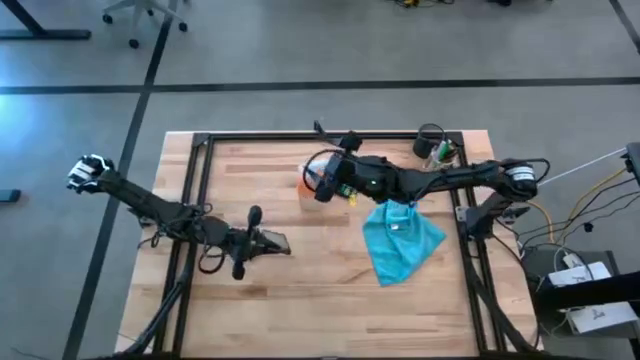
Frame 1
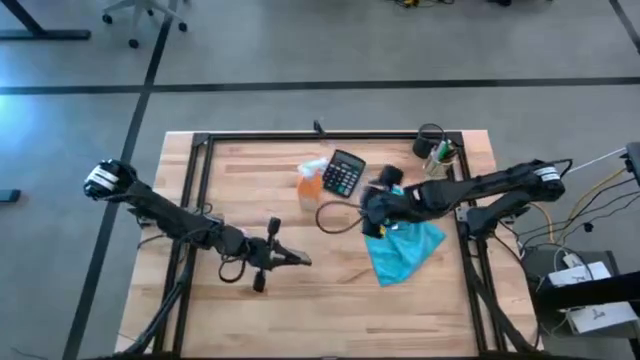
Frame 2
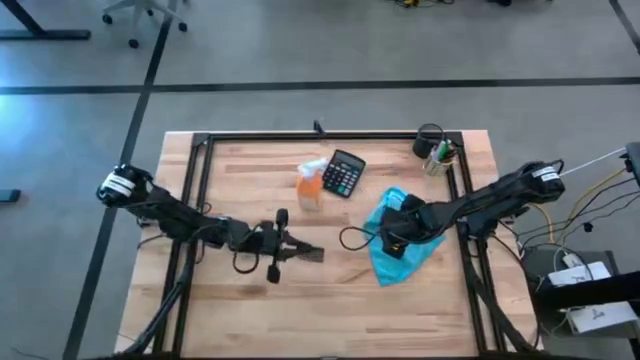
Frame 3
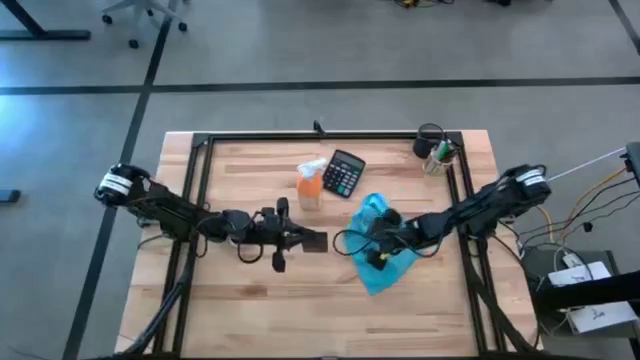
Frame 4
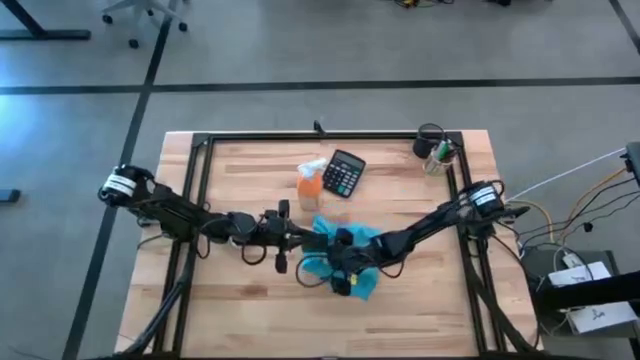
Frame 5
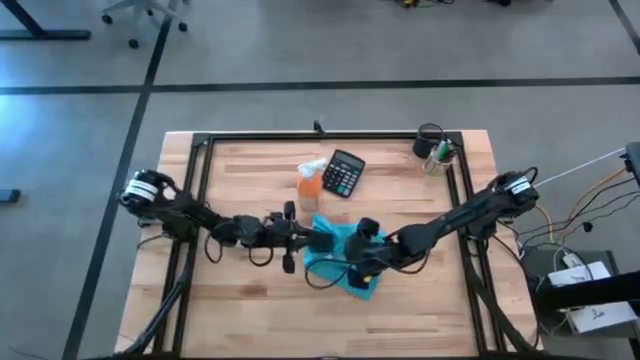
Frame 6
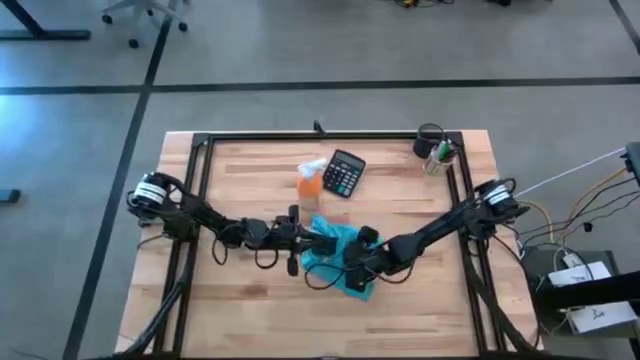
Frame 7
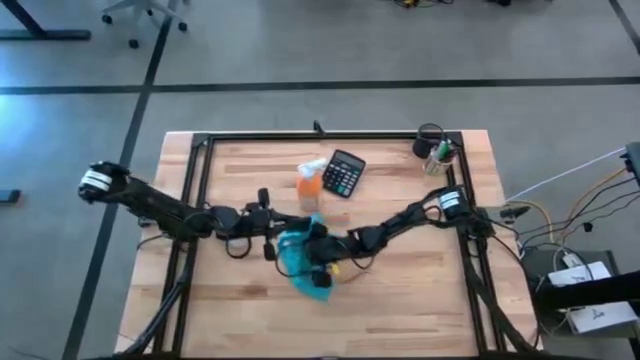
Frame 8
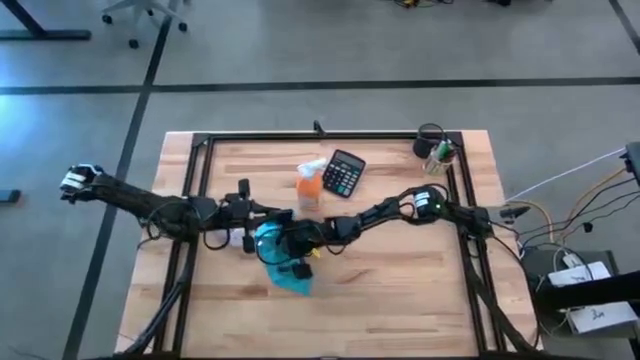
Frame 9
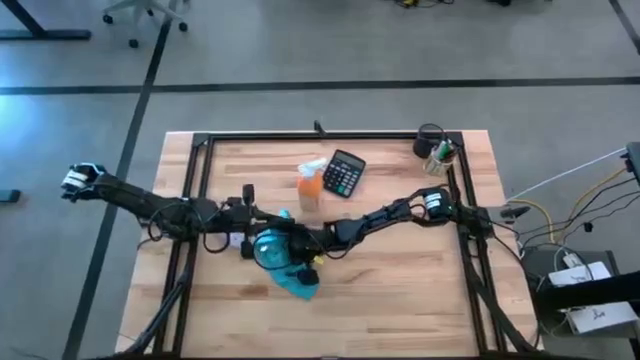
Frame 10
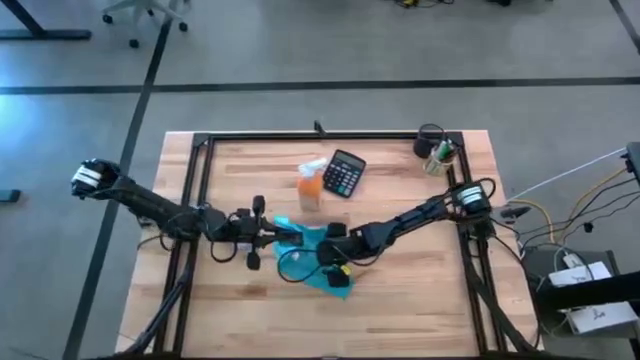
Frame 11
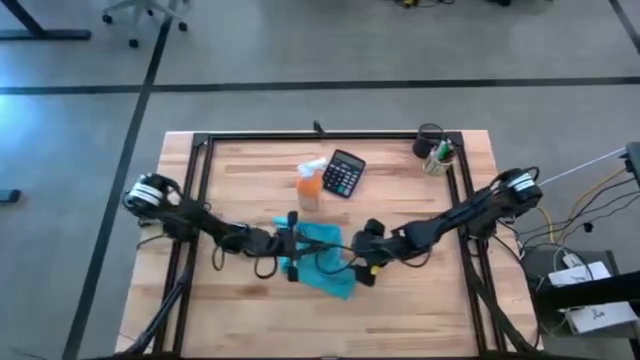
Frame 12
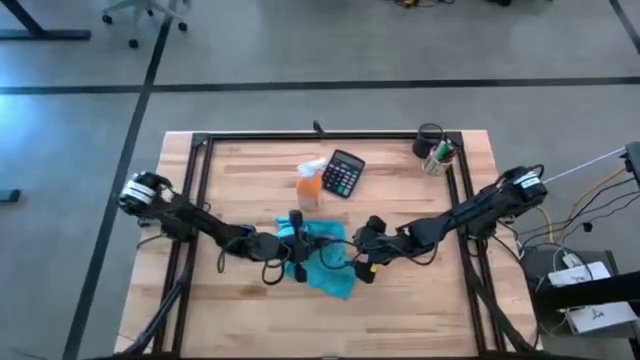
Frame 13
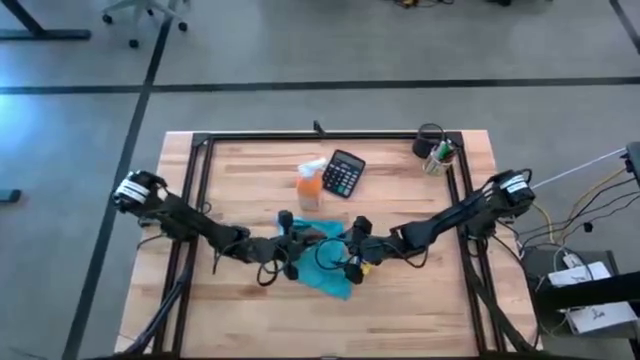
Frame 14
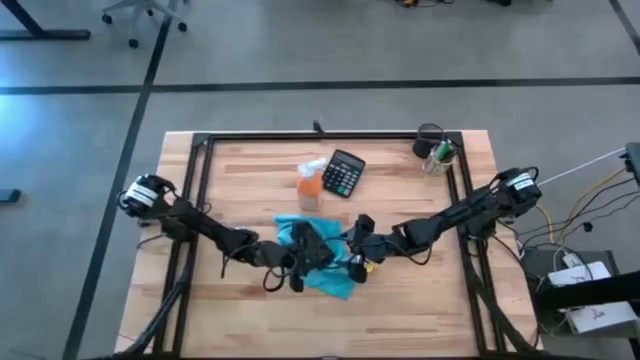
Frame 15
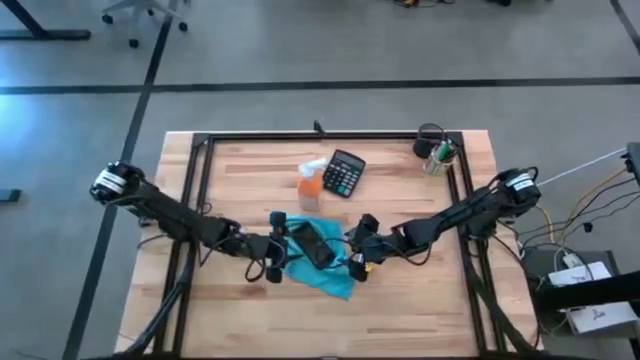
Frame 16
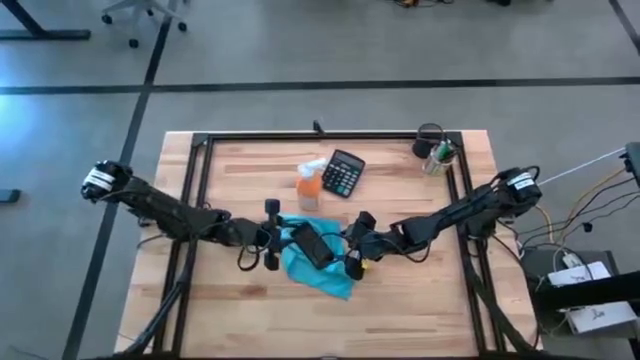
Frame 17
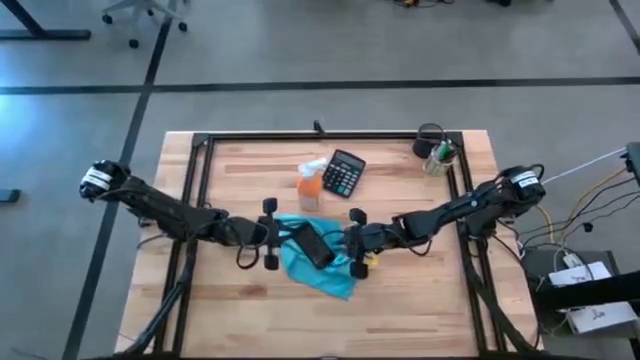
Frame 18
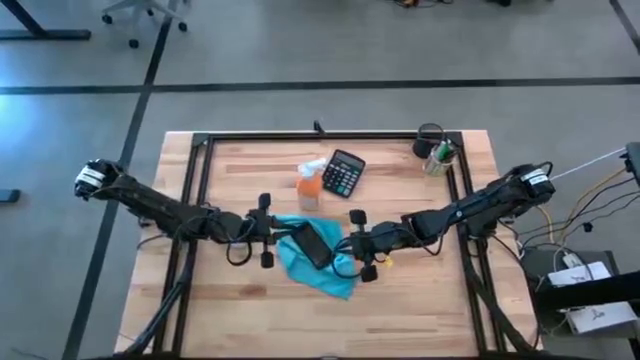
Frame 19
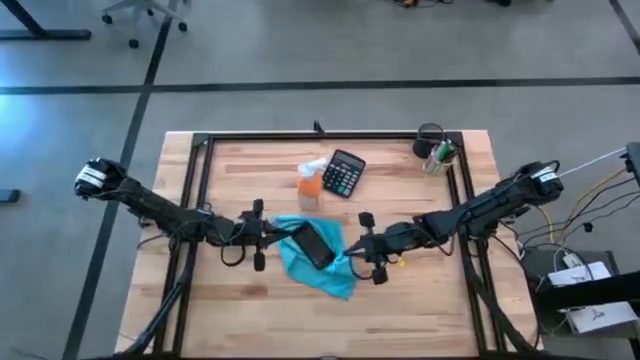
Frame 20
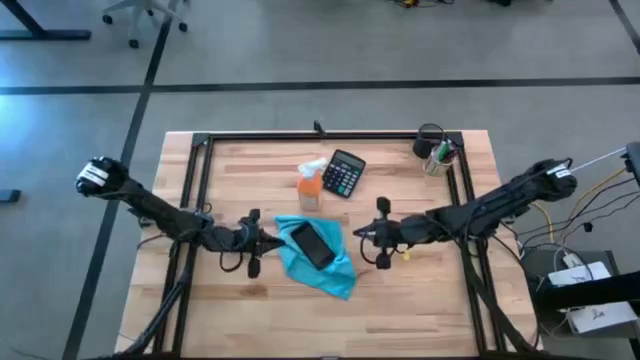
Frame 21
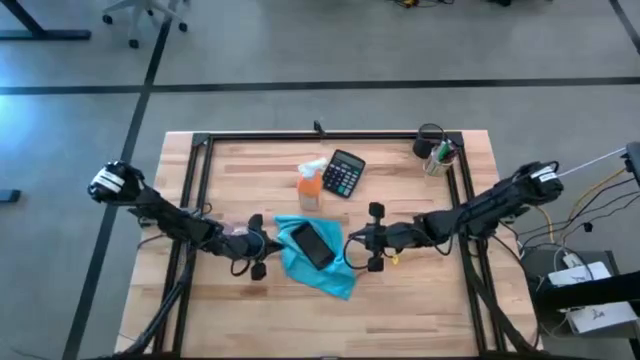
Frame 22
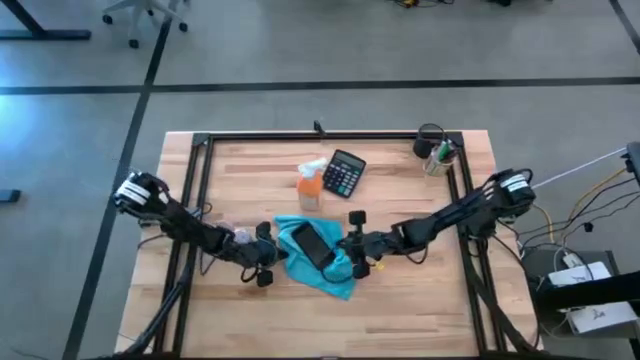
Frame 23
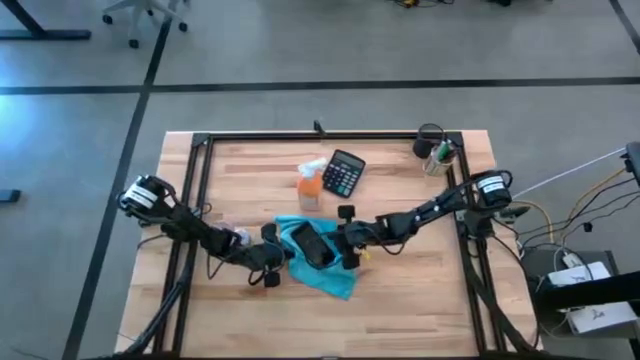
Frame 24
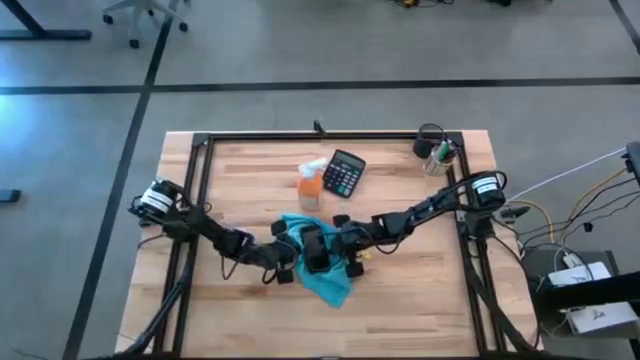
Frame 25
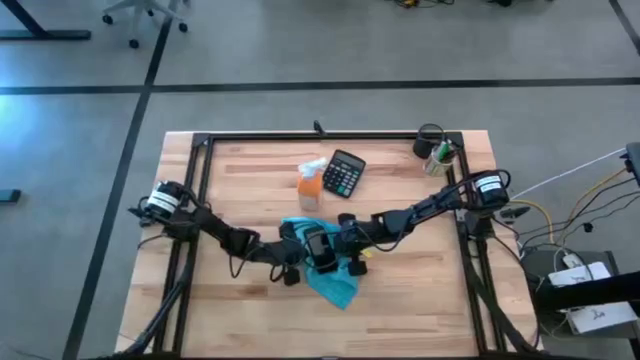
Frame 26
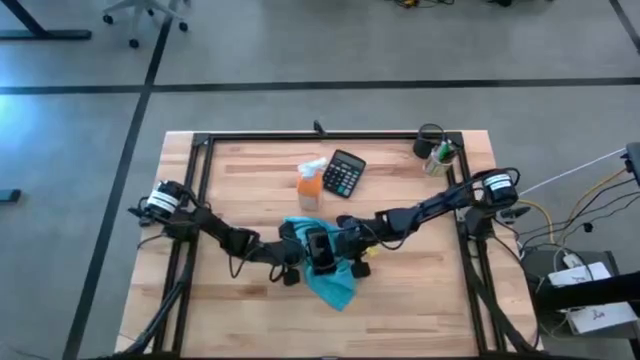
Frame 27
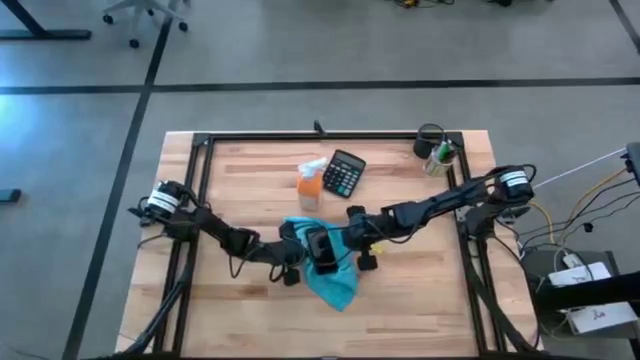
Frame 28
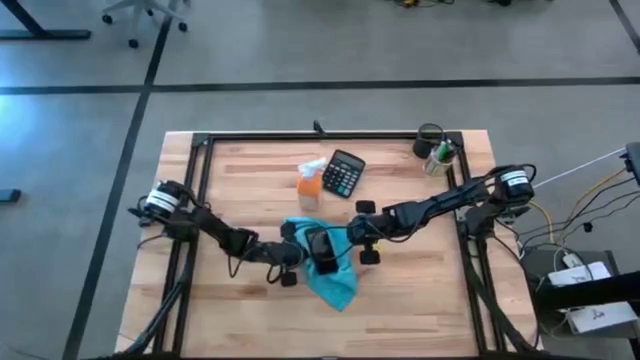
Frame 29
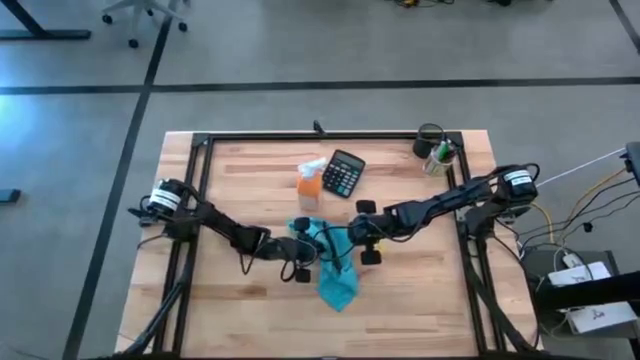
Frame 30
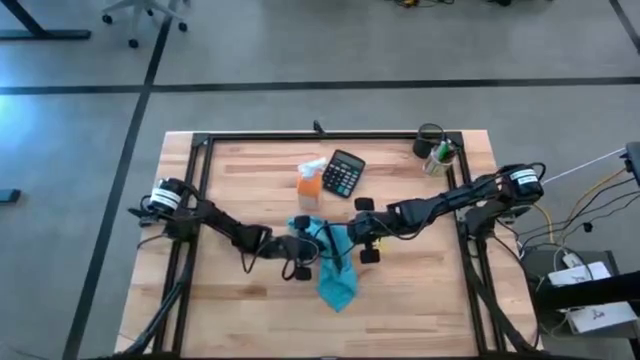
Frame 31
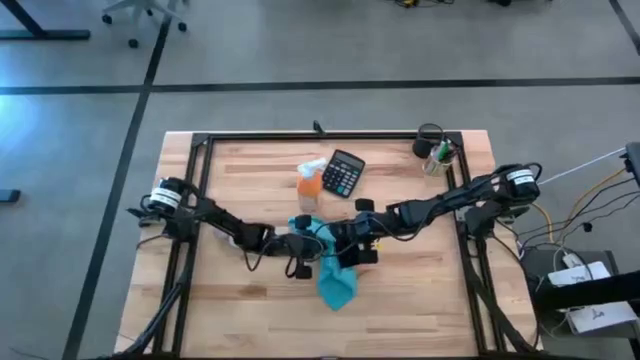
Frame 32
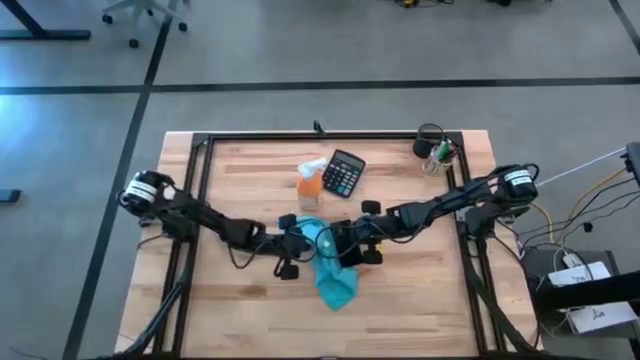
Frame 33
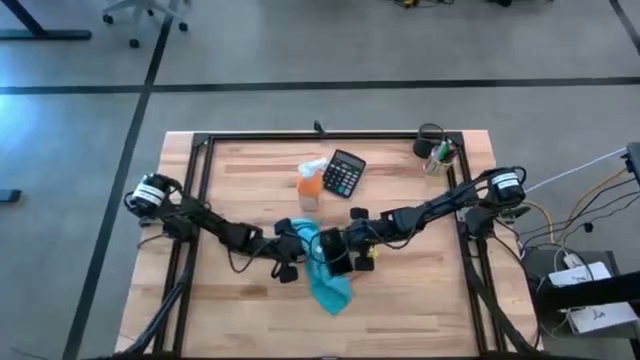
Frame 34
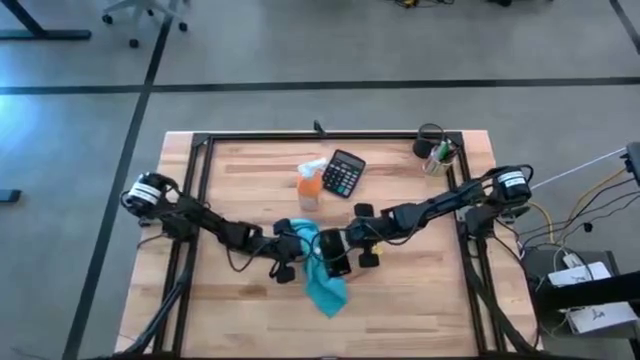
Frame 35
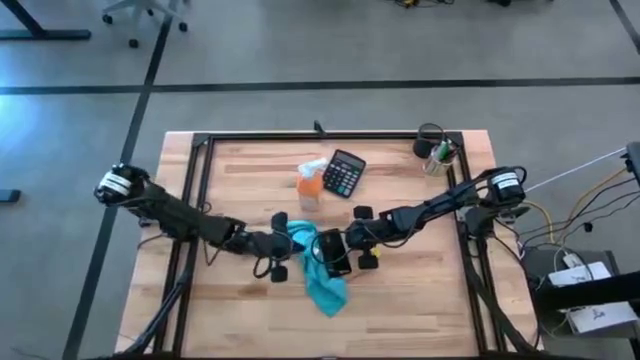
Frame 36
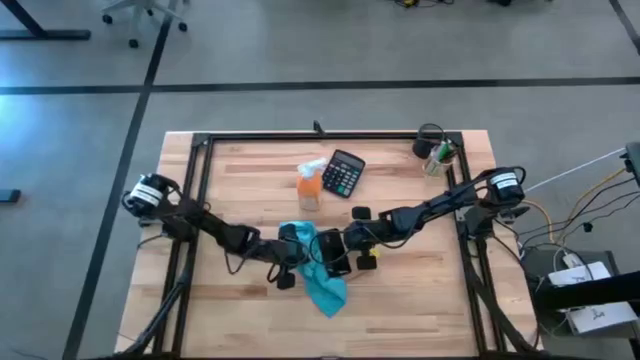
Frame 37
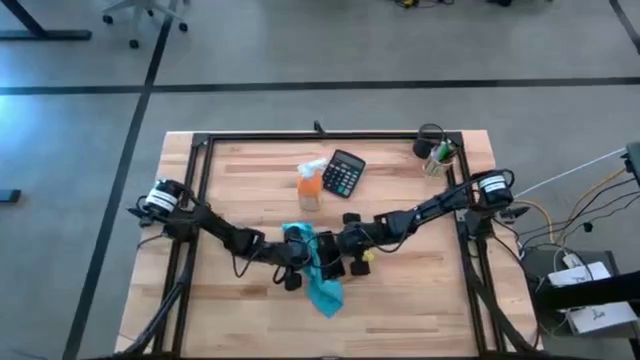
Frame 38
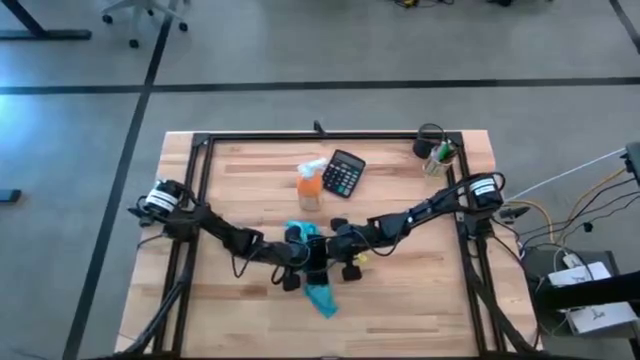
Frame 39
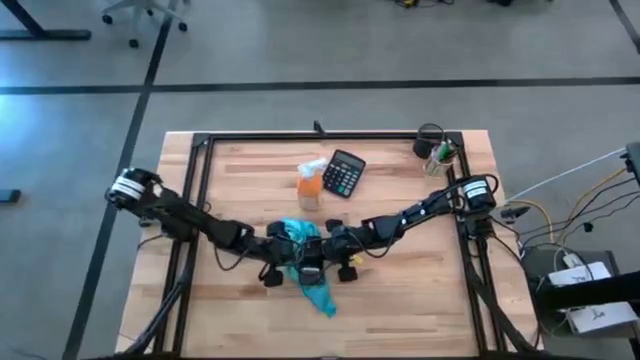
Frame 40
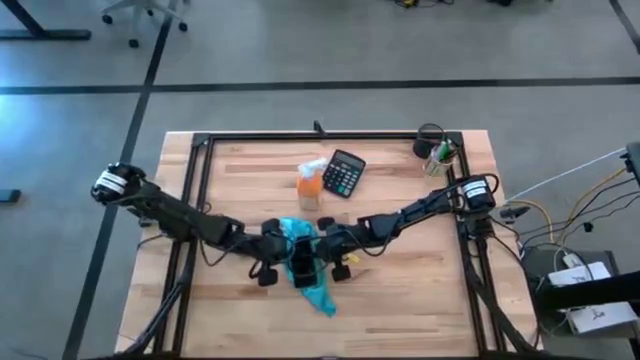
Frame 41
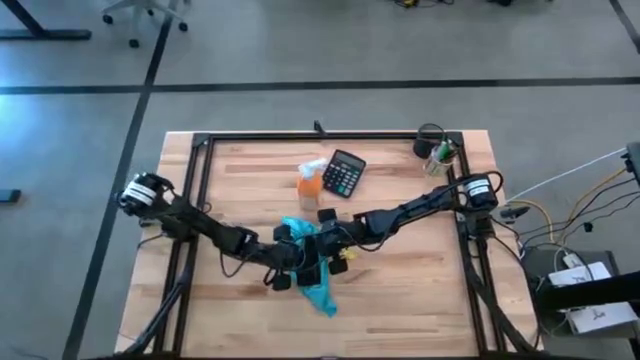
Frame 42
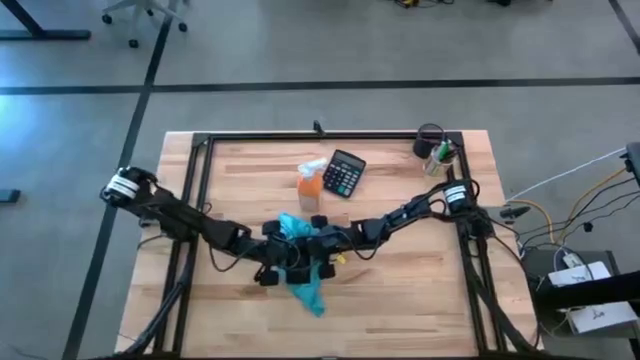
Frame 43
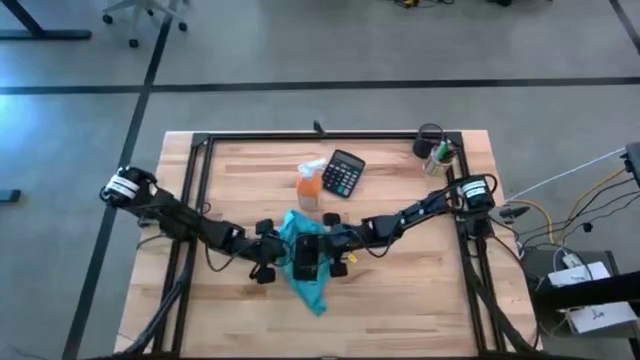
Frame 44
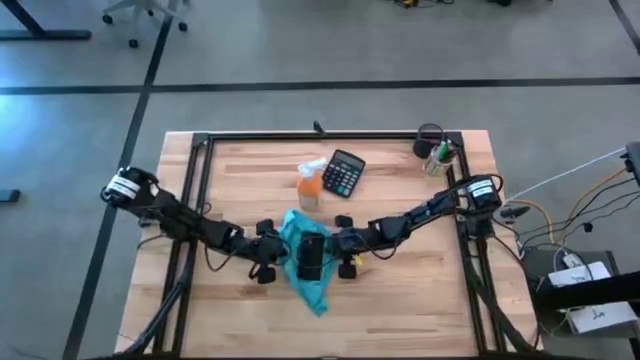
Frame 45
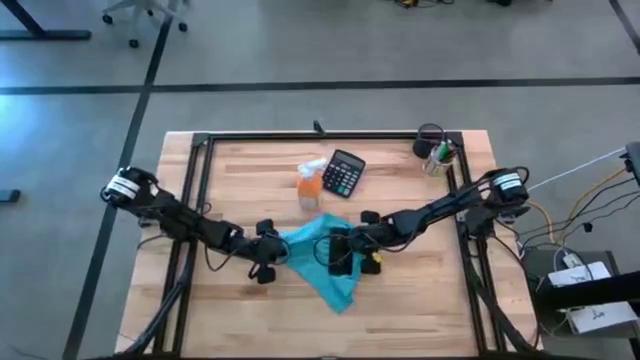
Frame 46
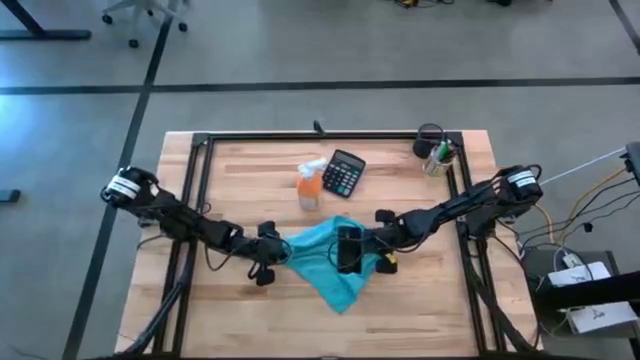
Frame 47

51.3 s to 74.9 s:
Task: Apply microfiber cloth
Wipe the front and back of the black cellphone with the blue microfiber cloth
